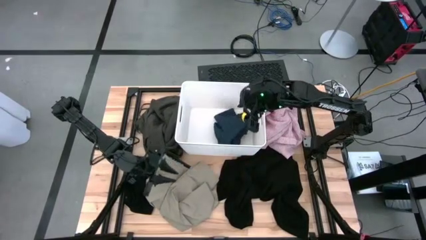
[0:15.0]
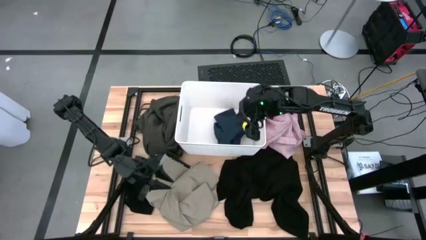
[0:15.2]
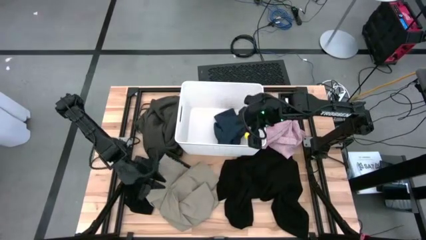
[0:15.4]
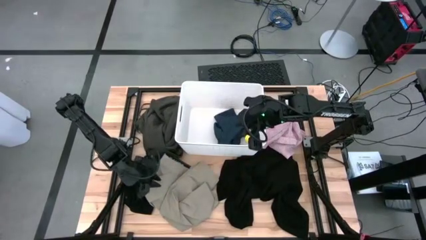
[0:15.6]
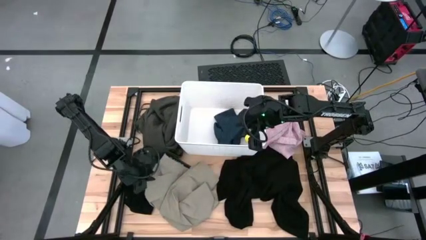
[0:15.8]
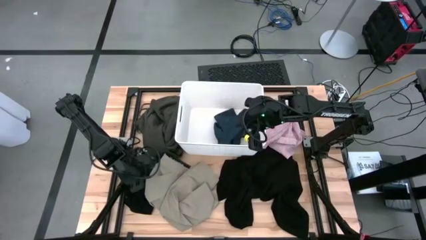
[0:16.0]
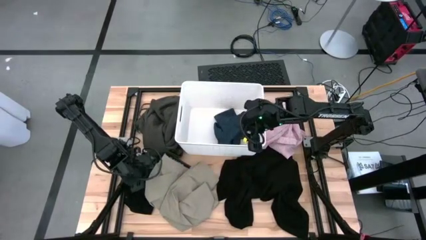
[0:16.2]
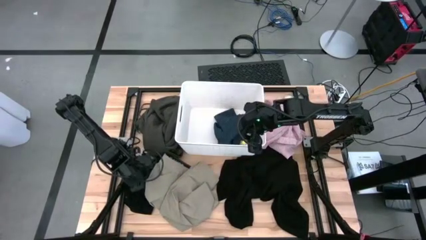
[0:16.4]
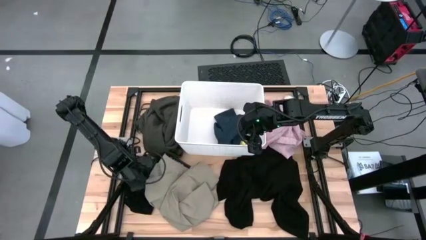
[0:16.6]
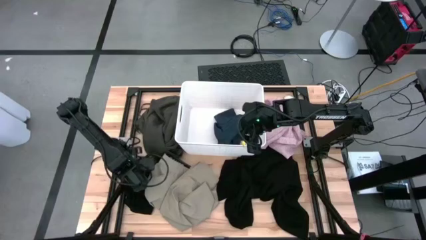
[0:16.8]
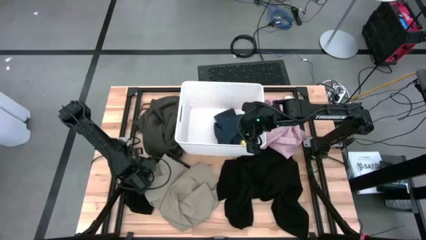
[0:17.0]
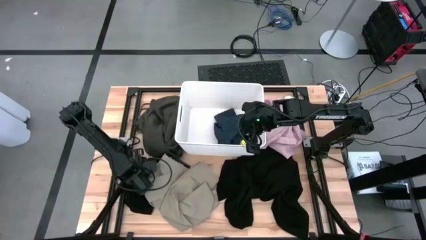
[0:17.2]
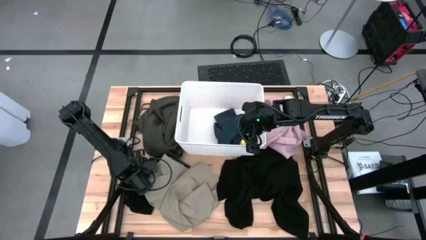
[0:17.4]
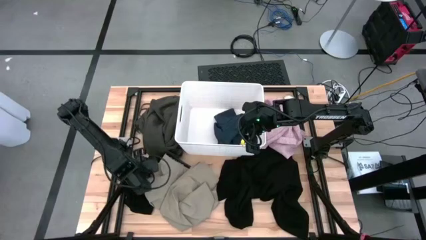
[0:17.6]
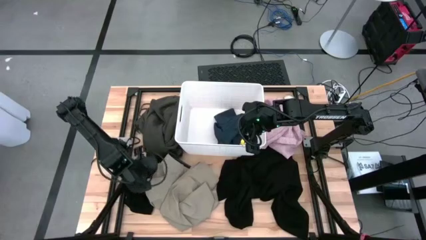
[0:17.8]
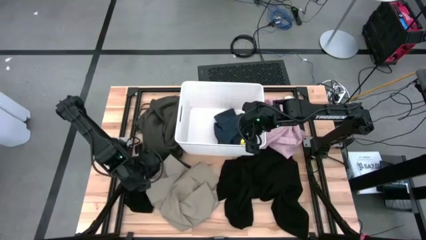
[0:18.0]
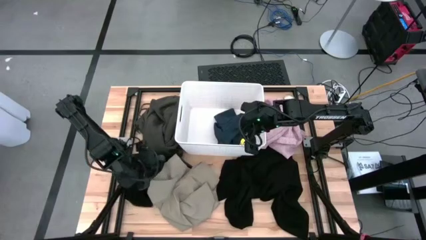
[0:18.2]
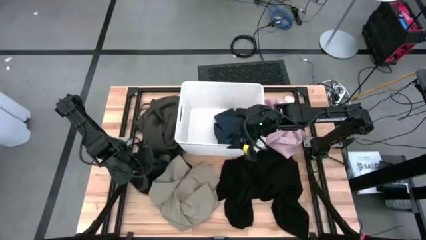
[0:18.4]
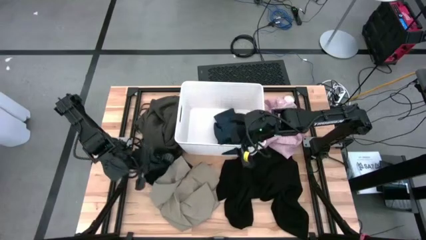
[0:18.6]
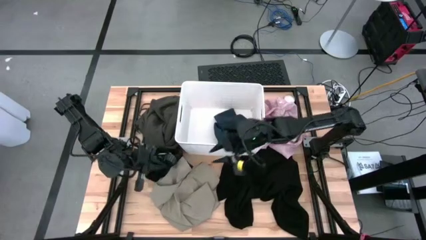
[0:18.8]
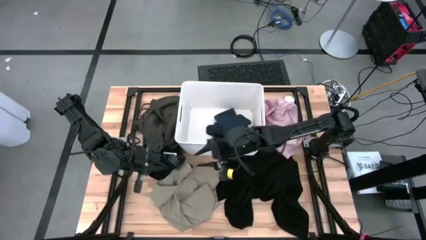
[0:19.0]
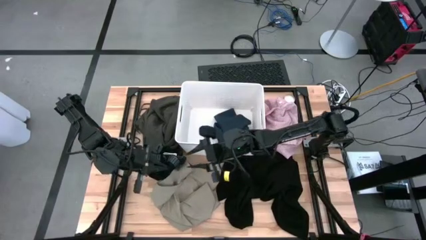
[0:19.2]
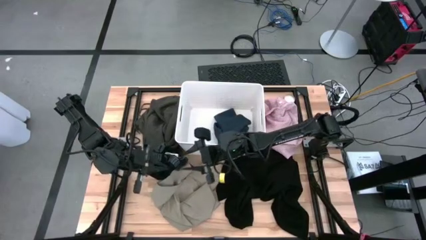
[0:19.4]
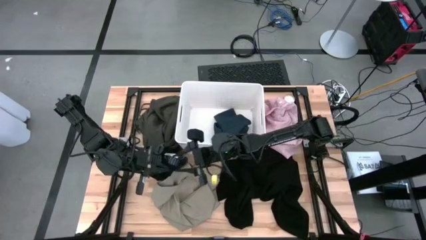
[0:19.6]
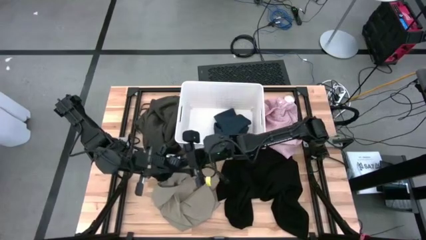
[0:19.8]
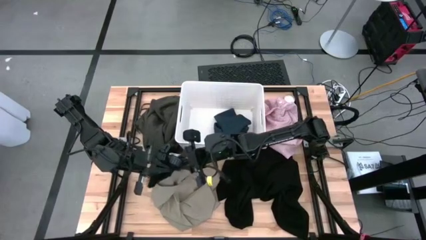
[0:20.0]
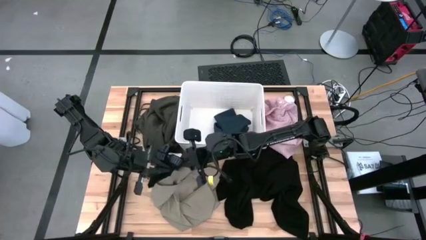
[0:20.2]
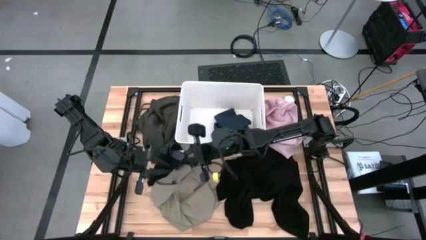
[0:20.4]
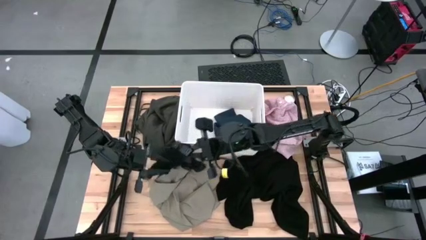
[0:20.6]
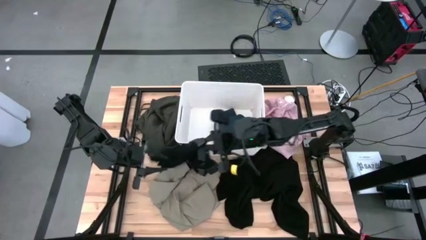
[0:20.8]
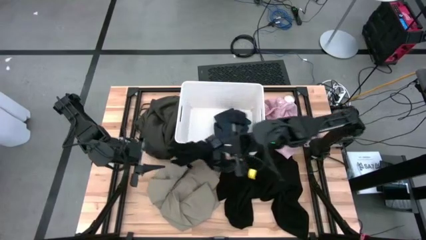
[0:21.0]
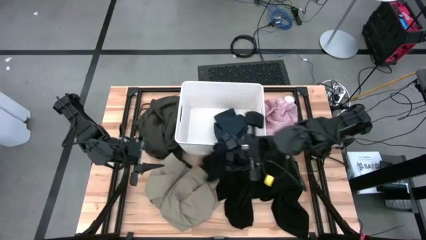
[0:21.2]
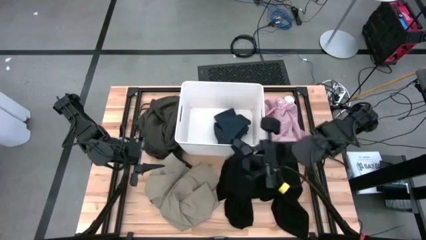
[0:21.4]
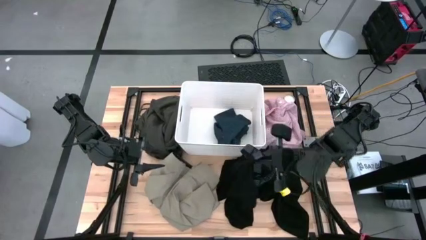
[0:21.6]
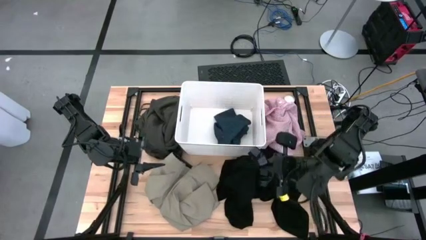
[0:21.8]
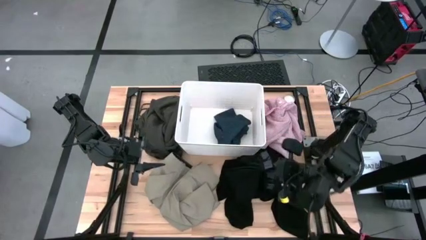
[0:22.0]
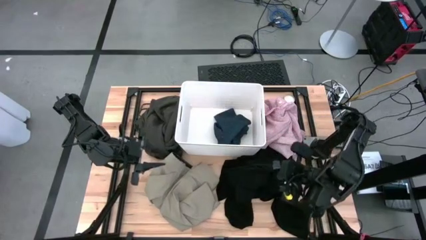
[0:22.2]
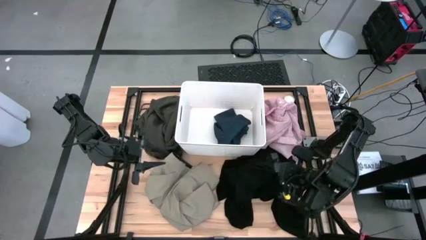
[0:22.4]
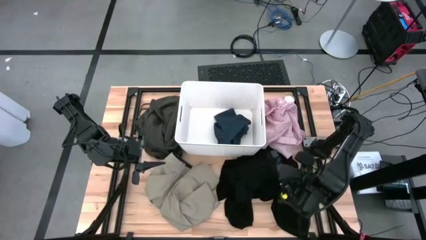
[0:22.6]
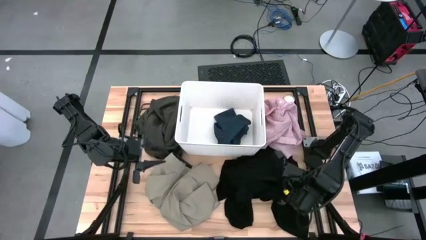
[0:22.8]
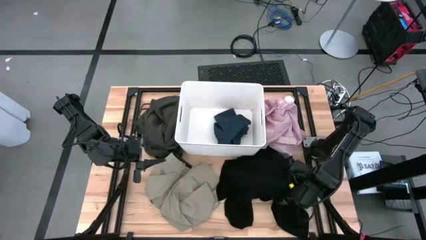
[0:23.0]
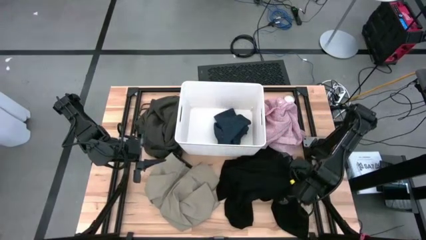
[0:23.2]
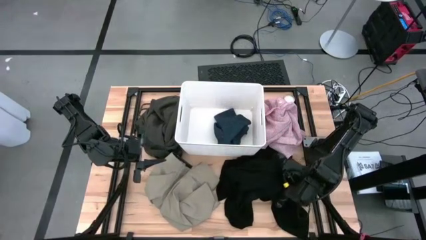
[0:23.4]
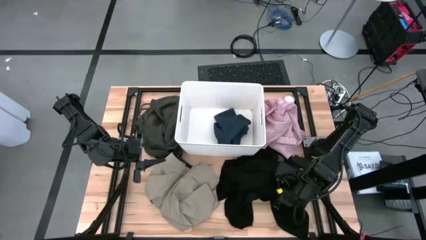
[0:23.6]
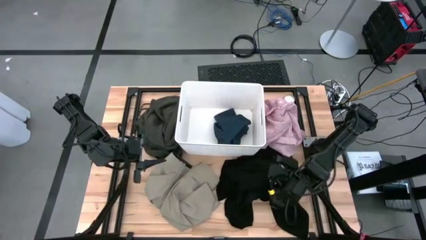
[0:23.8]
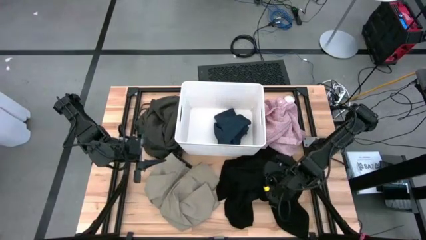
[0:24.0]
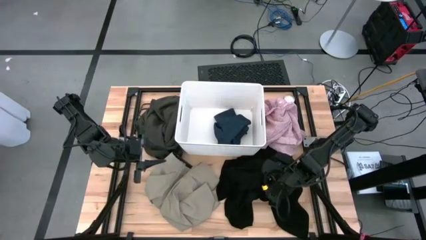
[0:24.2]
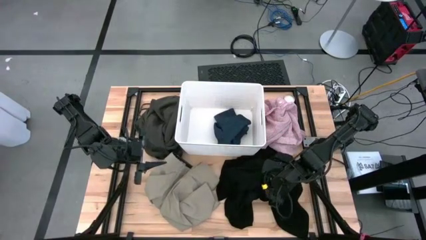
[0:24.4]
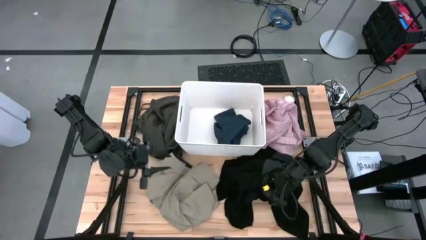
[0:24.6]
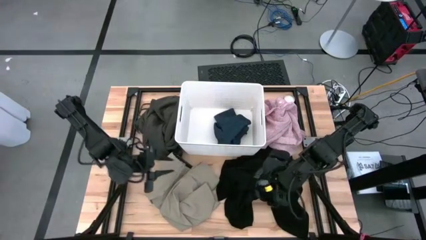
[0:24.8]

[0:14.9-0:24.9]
Task: Sort clothes
Move the black underwear to the right of the table

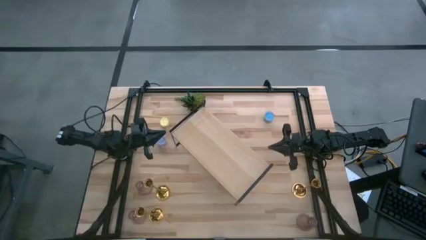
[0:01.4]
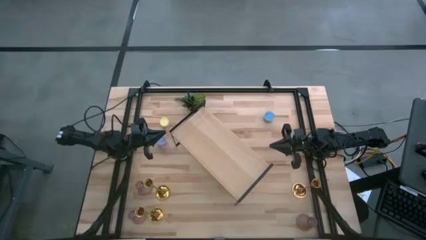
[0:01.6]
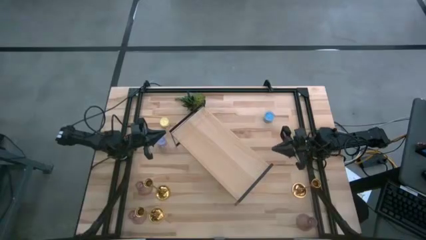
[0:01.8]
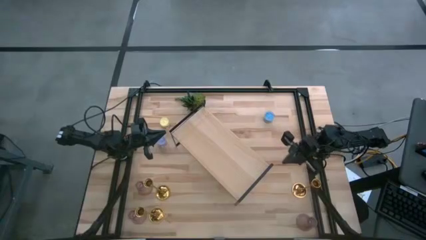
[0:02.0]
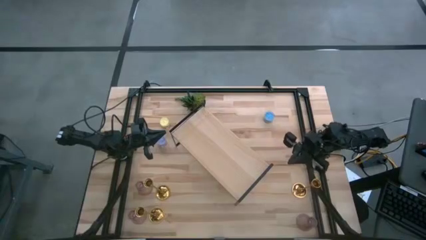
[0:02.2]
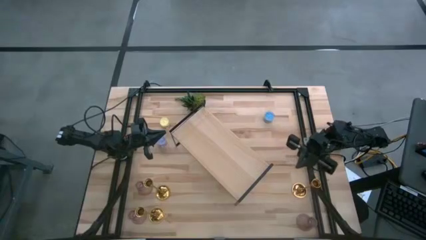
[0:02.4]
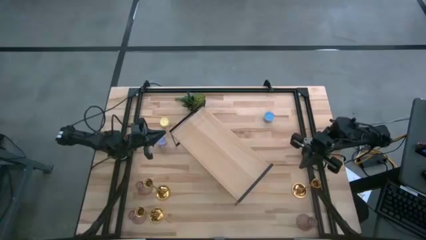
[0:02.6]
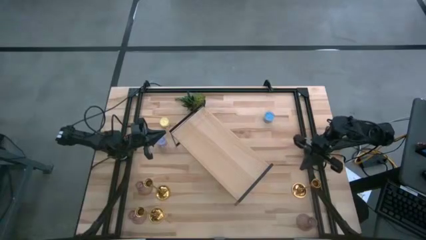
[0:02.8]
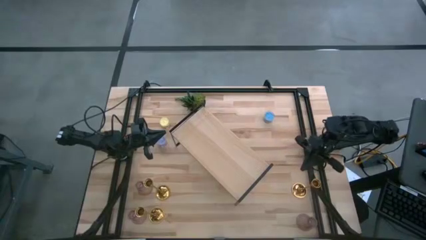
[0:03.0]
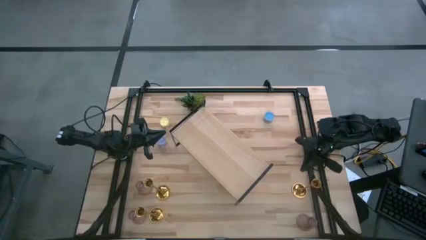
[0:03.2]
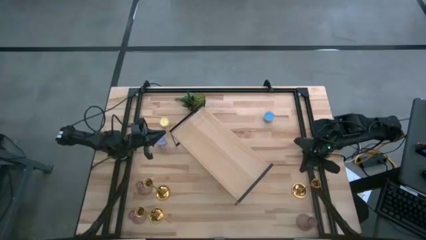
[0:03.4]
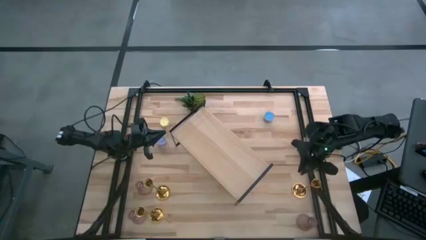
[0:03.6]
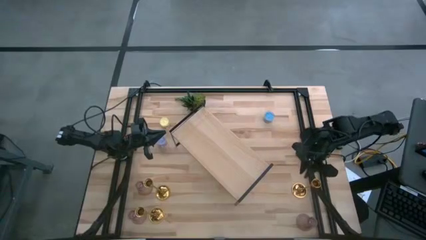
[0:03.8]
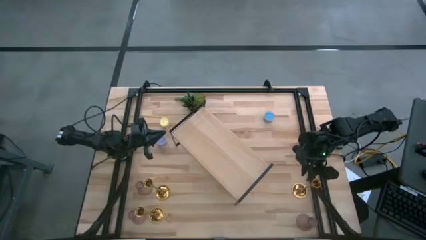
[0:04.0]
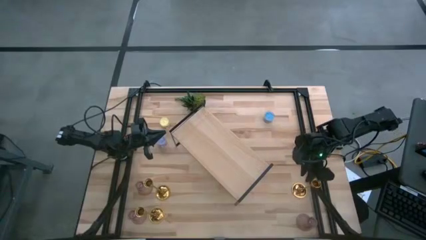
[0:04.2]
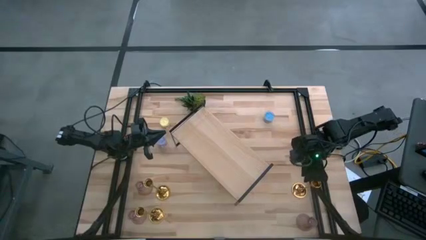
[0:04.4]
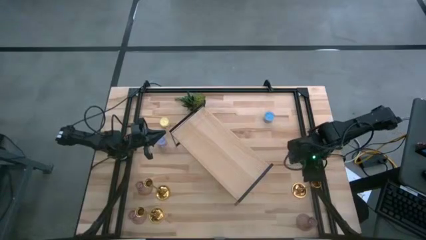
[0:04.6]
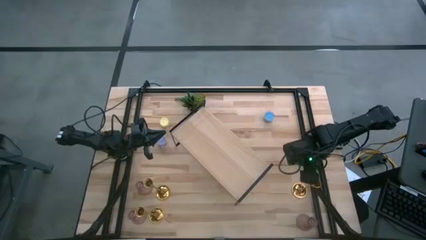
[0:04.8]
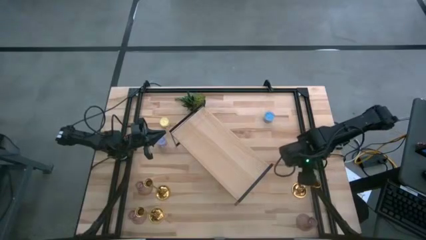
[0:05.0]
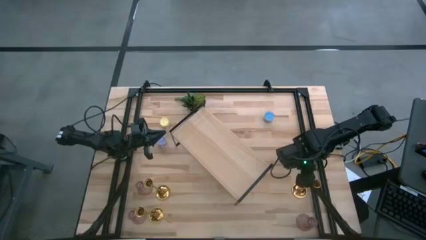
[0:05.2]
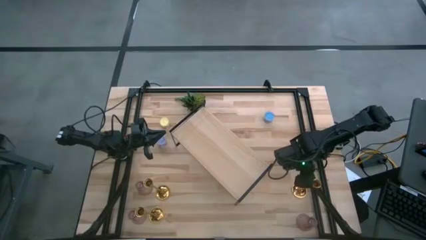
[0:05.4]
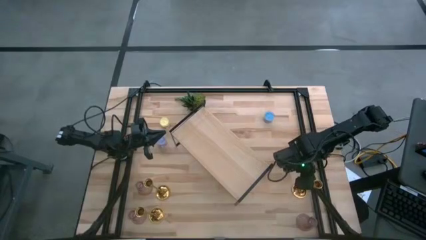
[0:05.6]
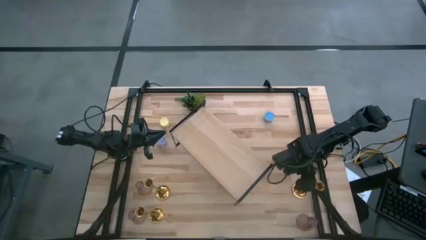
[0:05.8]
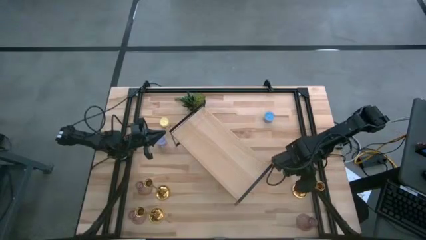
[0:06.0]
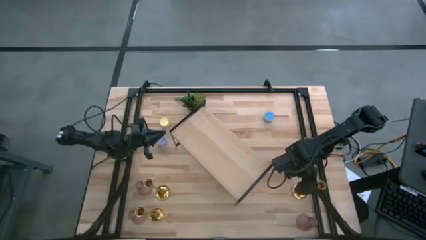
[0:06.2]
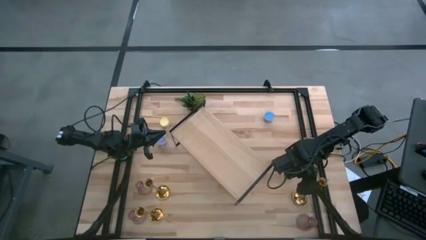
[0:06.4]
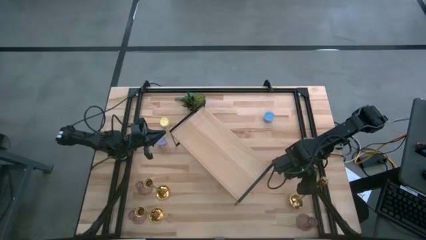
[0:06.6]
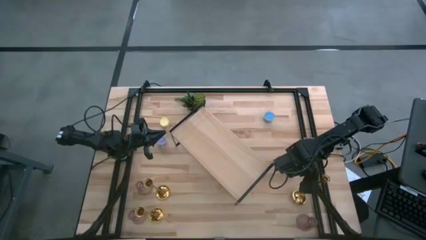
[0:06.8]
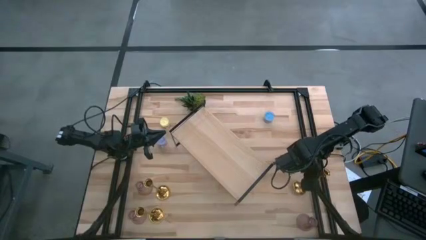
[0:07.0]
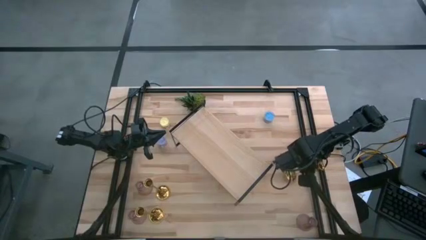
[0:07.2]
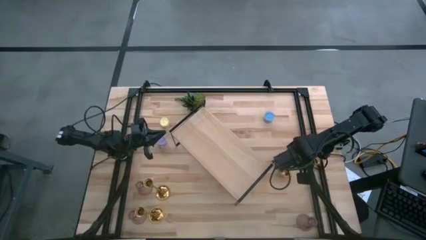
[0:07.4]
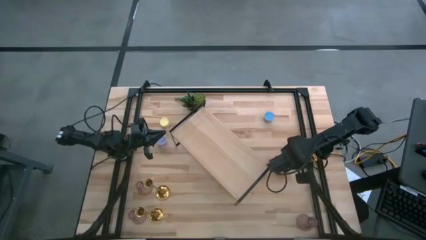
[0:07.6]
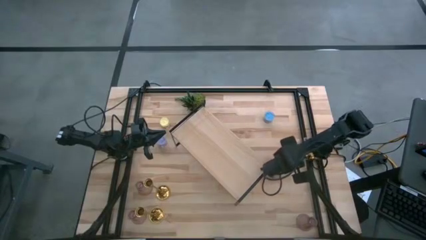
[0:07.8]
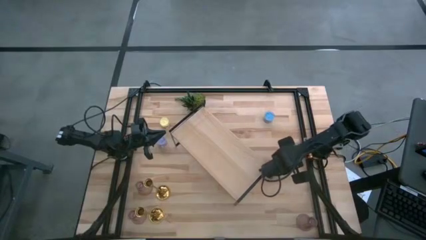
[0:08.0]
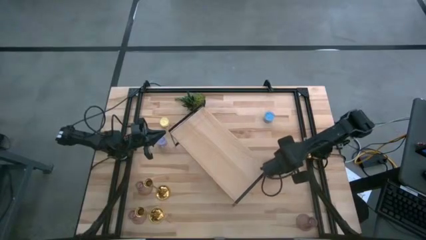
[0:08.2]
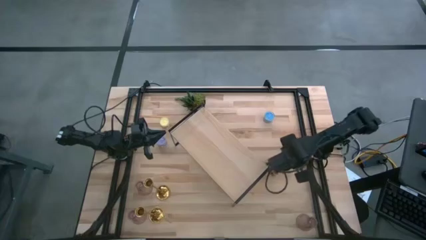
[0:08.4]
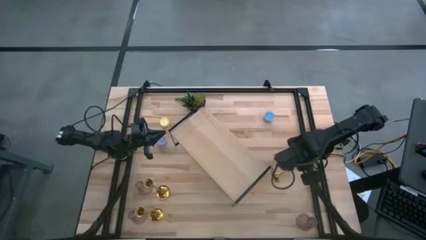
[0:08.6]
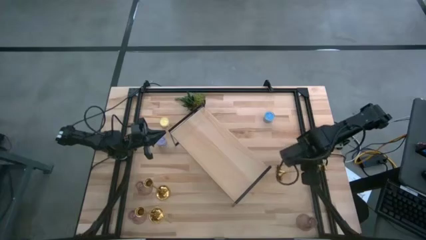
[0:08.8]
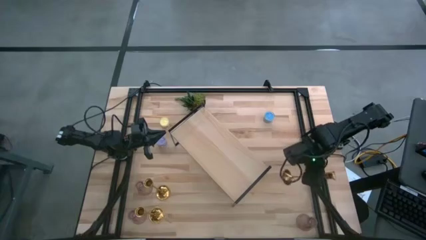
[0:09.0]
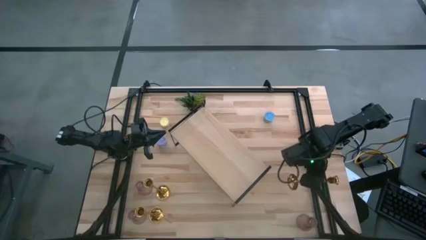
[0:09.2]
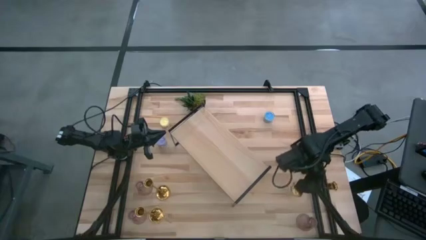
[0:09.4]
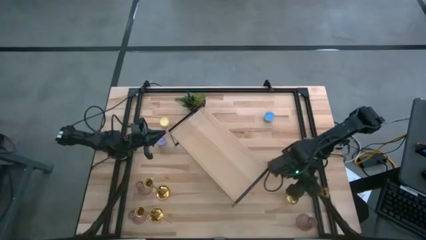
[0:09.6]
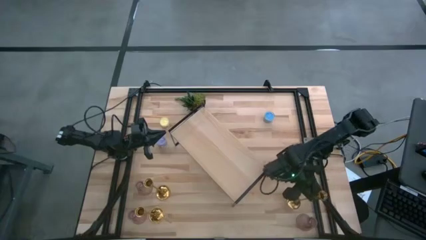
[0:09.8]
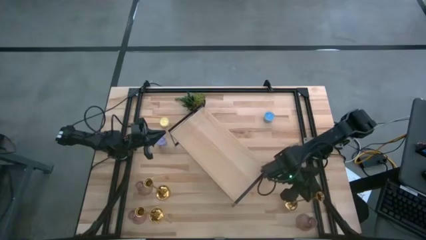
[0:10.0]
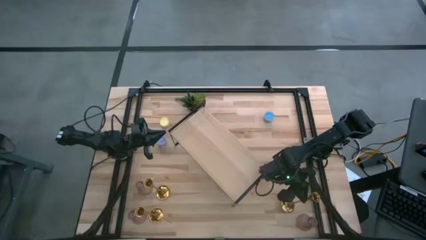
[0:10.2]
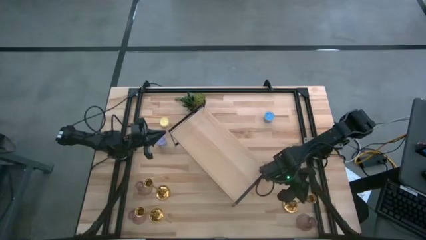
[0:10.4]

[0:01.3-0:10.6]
Task: Pick & Place candle stick holders
Put the top right gold candle holder on the shelf
